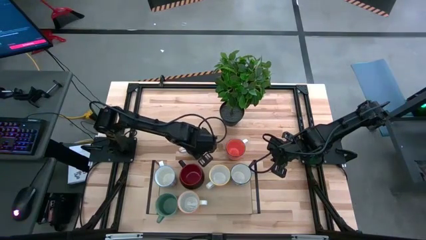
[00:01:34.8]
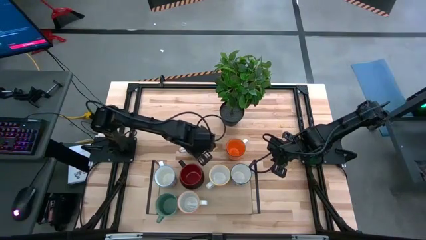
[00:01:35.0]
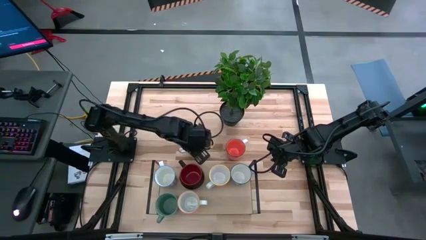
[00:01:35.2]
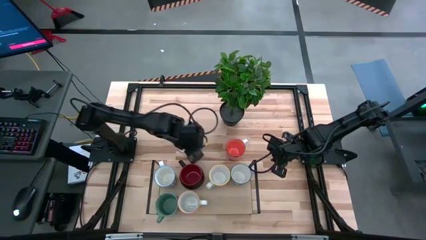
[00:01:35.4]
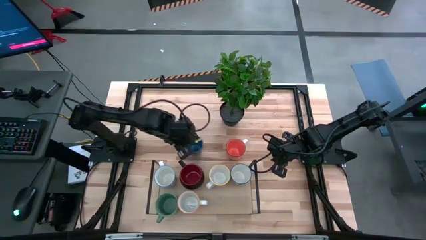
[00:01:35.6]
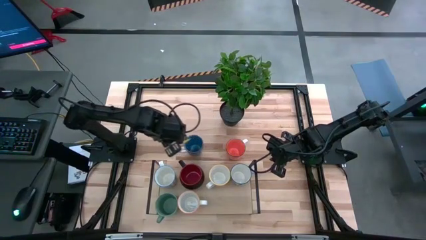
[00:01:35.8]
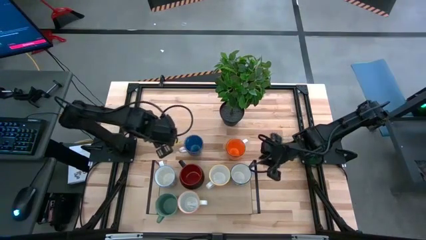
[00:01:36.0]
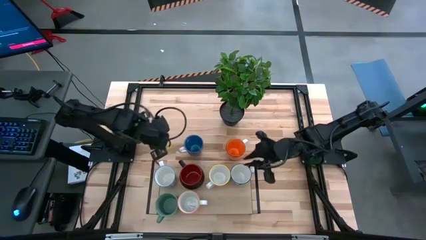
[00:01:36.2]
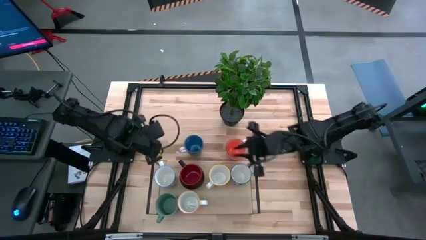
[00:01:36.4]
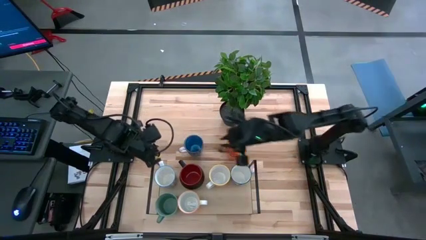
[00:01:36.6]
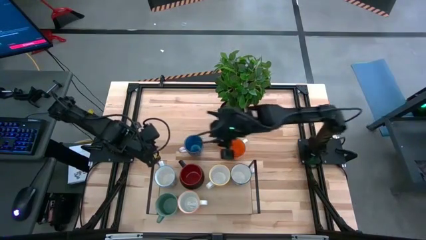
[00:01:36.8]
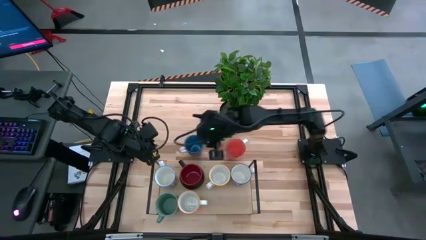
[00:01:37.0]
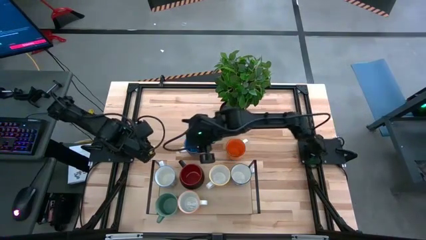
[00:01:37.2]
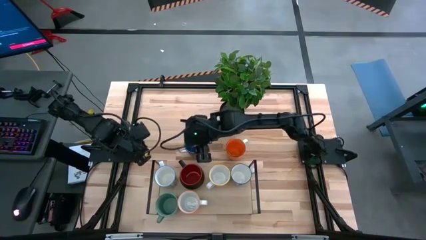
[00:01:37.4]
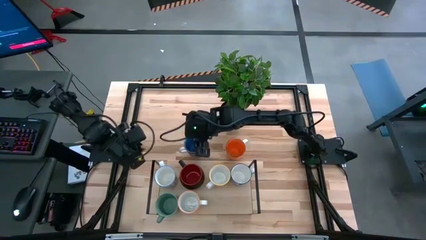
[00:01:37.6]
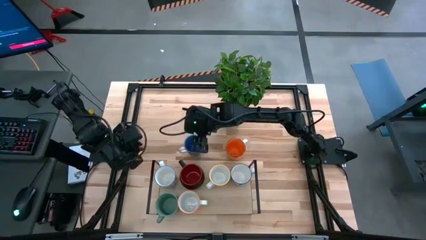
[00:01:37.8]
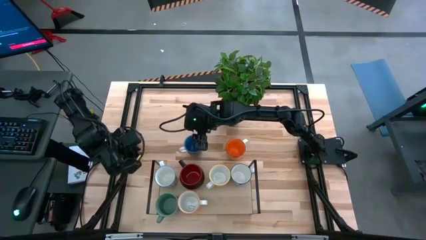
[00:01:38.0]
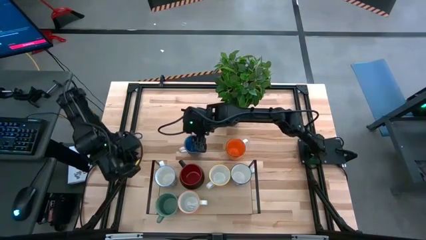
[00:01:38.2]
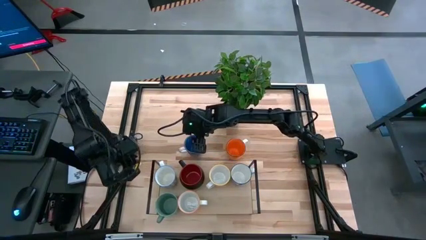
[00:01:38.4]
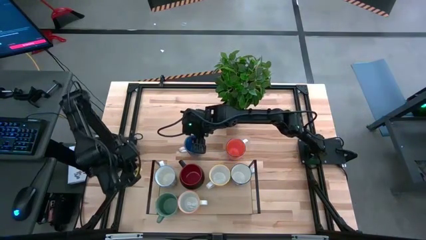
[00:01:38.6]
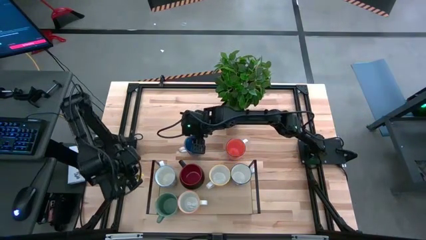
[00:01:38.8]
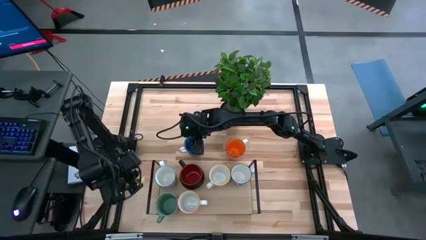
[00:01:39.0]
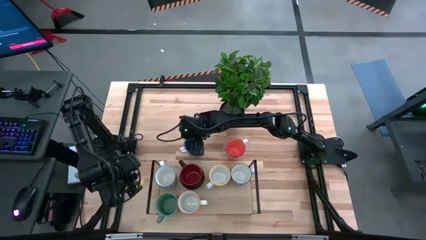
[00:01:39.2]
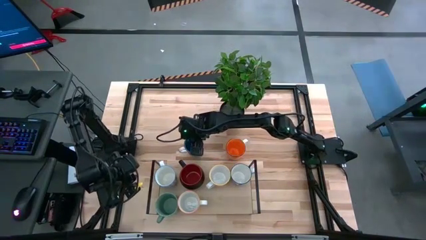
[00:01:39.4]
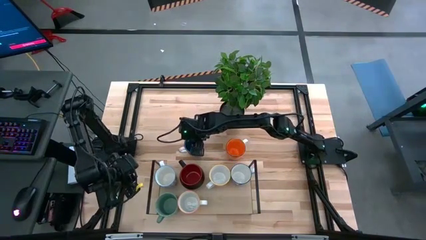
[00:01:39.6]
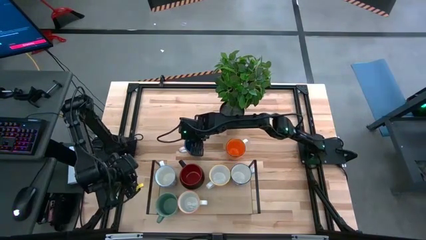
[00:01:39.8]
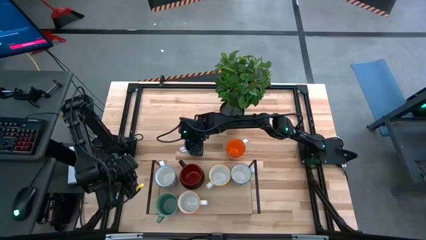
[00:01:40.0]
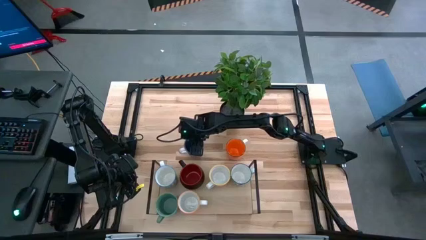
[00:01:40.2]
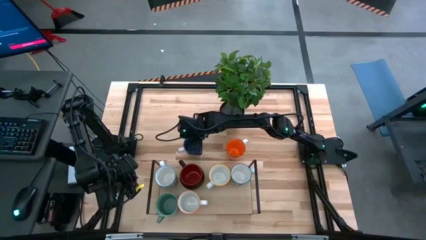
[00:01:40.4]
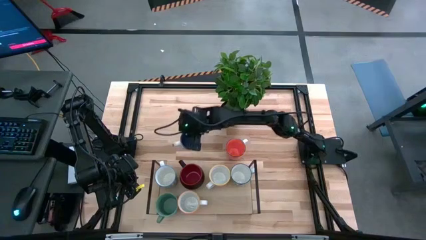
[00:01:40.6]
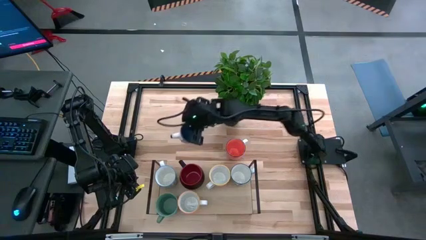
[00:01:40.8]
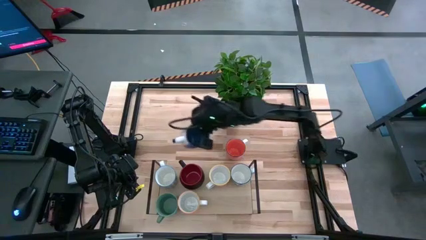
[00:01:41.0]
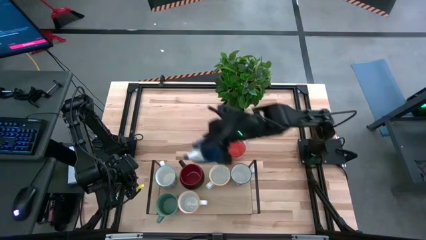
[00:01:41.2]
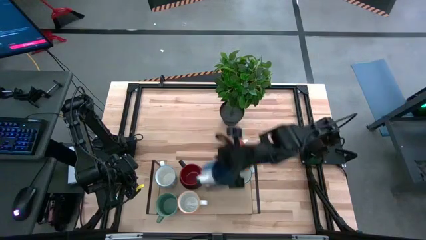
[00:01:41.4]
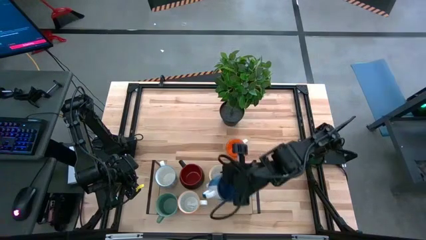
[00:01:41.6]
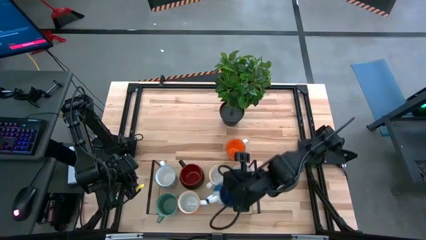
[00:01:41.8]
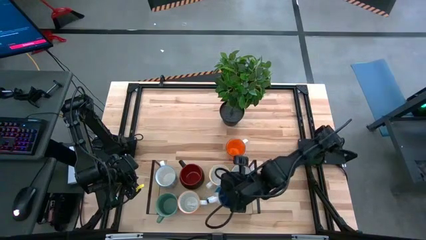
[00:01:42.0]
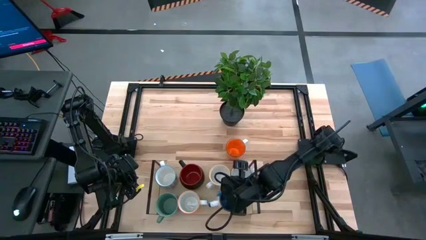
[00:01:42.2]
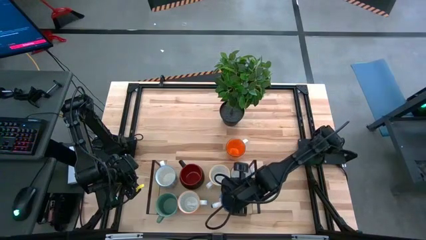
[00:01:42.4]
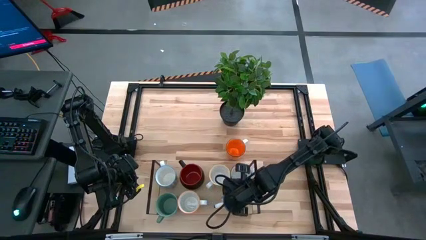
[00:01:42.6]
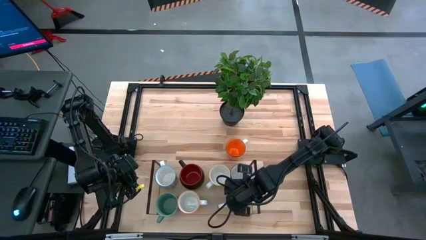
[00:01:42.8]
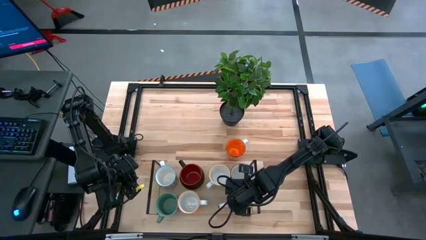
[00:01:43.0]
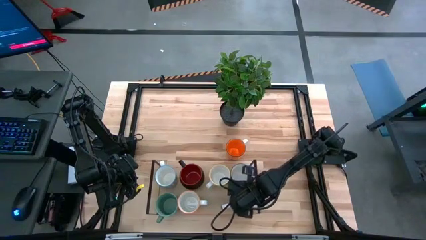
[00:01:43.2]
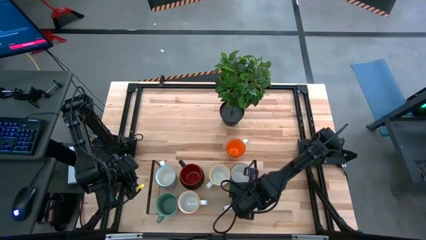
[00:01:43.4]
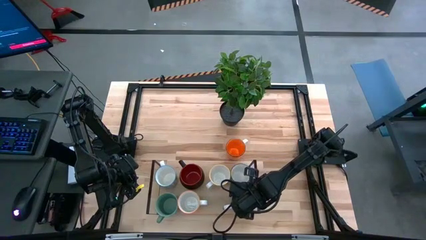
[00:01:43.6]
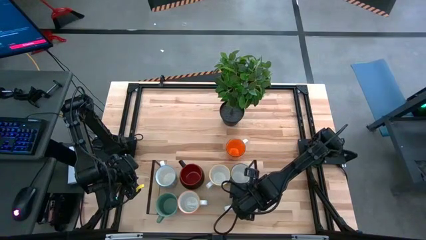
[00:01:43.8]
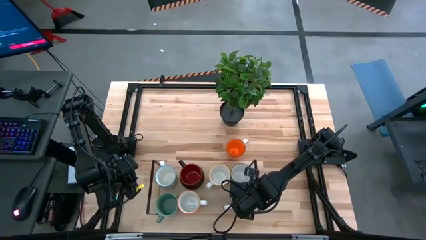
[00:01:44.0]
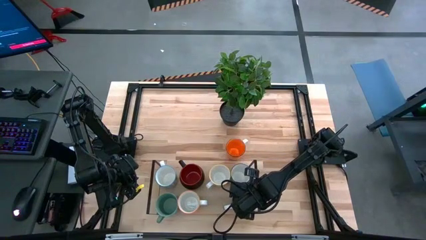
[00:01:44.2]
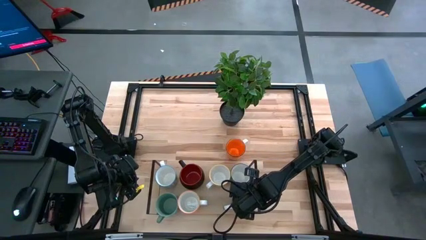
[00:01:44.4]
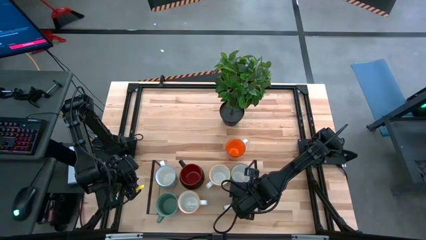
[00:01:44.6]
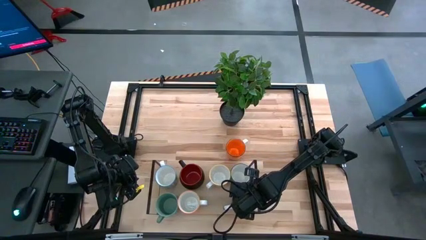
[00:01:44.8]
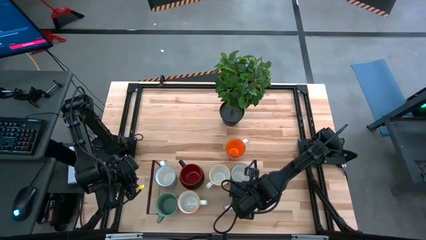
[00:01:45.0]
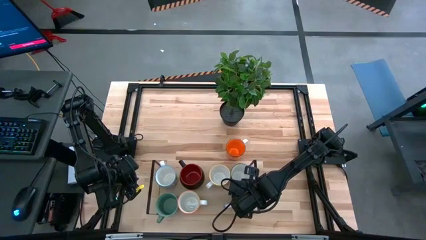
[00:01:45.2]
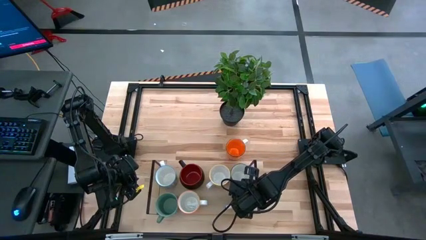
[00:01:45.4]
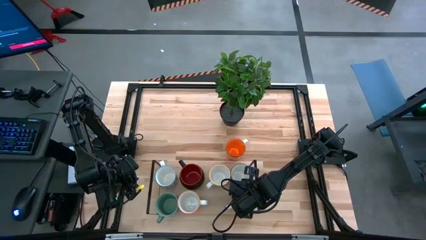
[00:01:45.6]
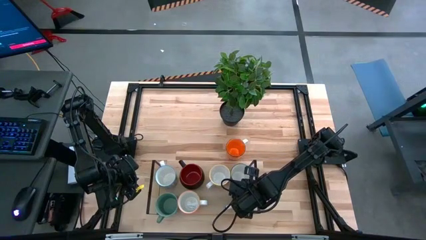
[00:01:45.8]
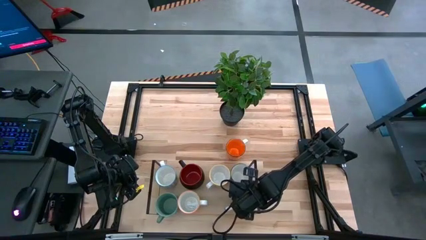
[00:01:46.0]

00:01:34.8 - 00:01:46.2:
Task: Place coffee mugs
Put the blue mug on the shelf

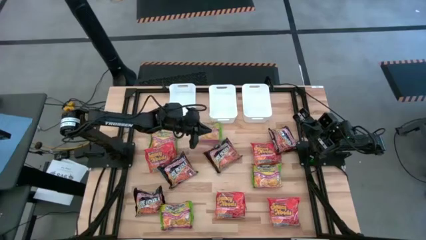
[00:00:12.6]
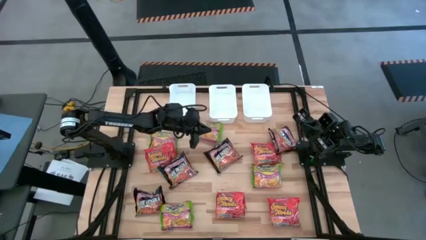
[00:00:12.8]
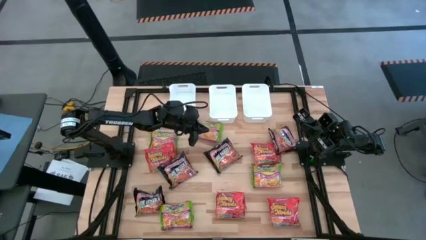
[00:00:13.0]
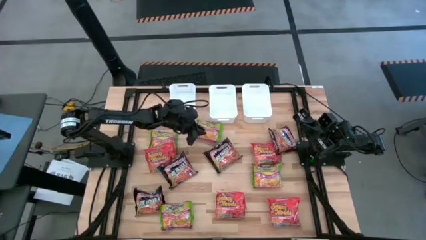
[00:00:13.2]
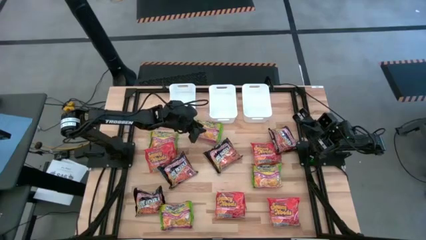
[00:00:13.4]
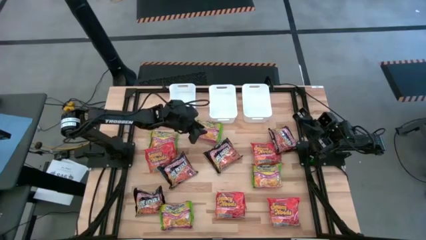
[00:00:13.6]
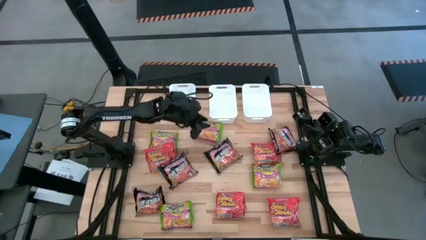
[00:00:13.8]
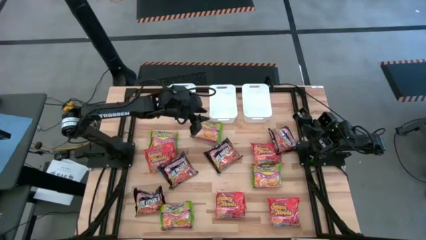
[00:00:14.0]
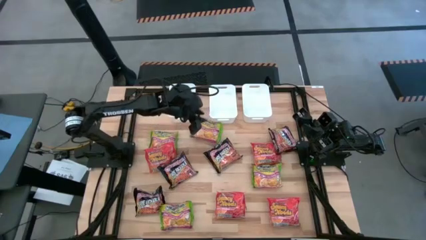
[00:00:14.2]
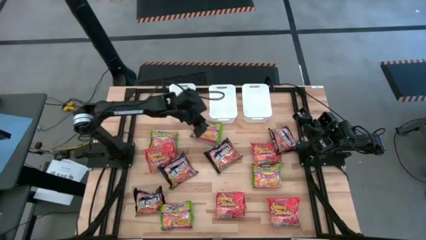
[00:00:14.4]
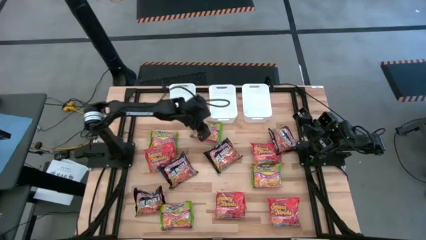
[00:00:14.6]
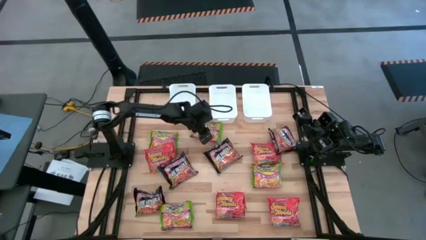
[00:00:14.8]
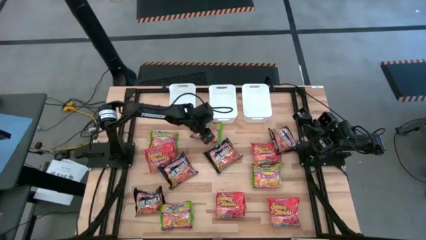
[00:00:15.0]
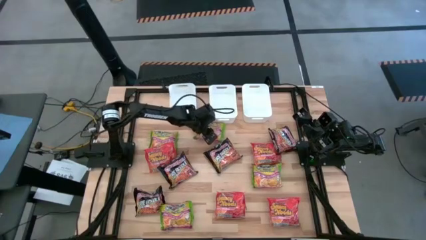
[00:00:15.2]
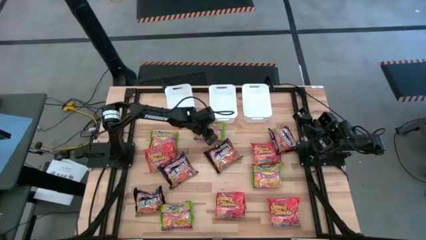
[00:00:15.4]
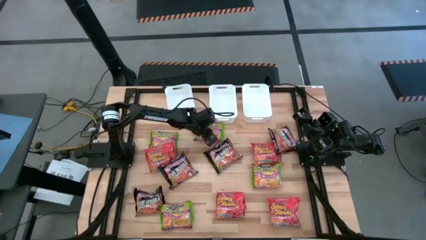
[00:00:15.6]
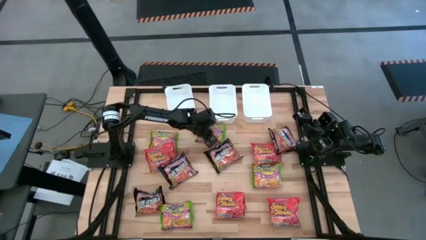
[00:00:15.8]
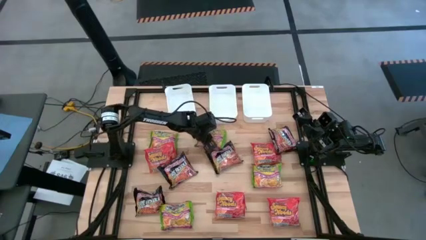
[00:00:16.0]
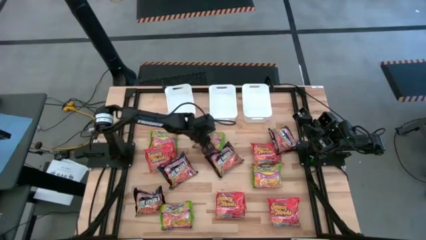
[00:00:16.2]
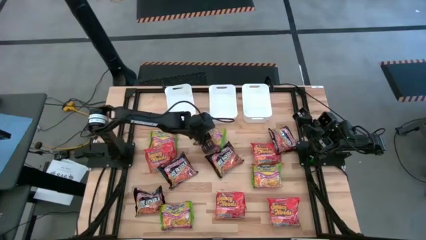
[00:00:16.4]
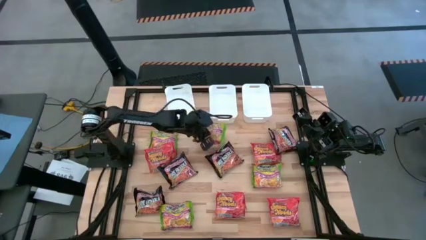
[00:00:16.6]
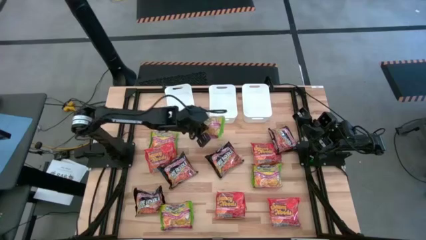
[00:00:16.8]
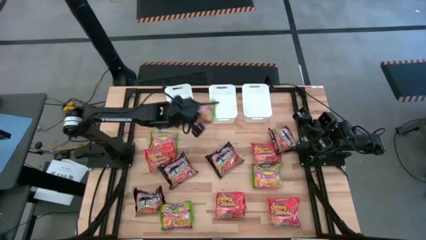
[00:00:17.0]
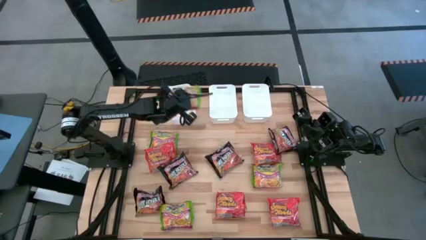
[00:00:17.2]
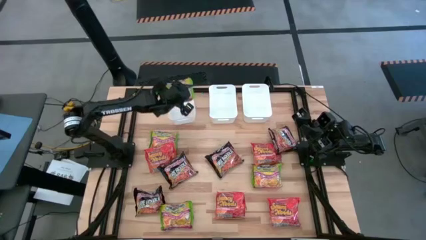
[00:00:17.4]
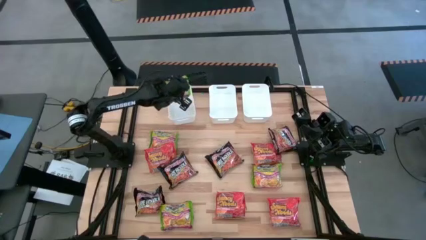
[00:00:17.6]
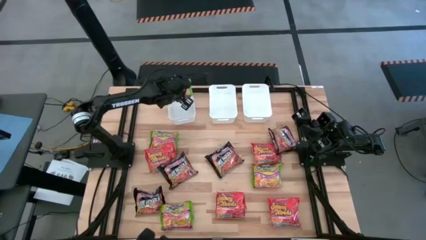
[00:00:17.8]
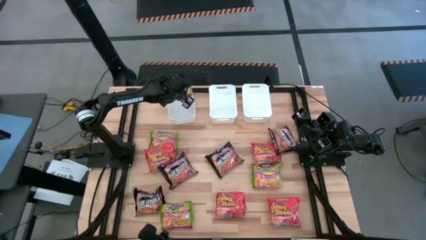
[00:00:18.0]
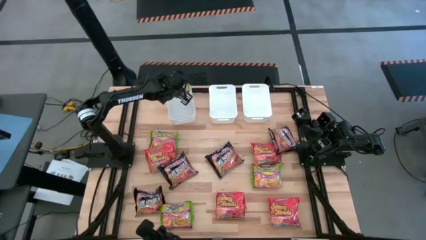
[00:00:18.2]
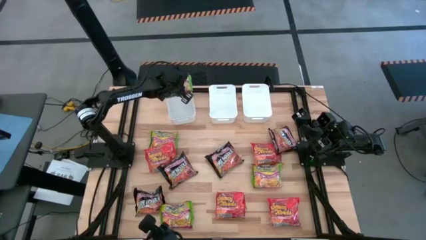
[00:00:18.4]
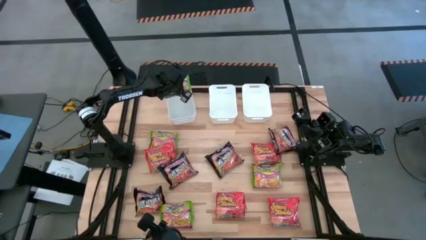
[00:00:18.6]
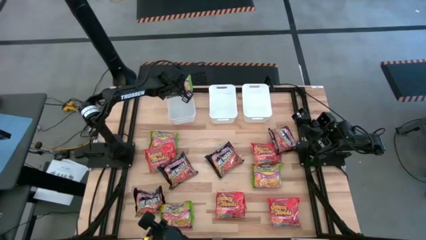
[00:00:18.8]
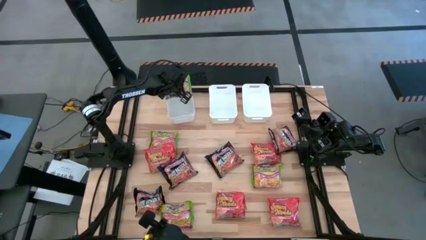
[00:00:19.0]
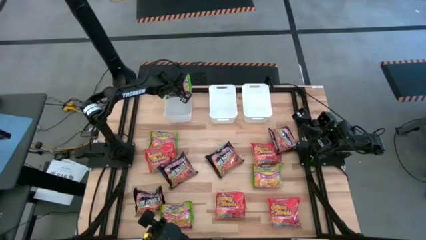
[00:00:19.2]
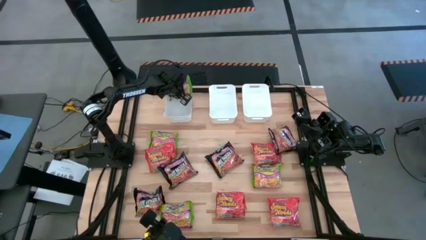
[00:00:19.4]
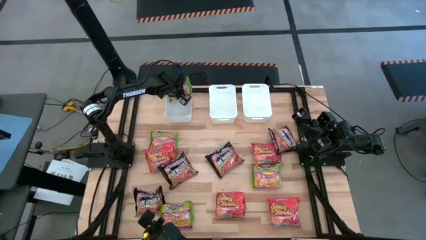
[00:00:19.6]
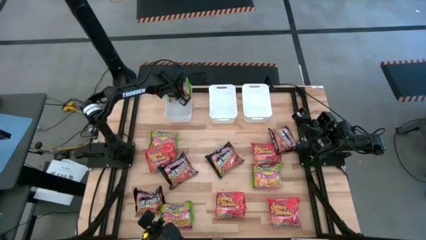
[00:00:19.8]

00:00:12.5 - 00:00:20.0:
Task: Sort Maruchan noodles
Put the green noodle pack into the left white bin
